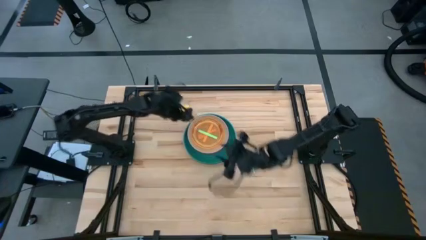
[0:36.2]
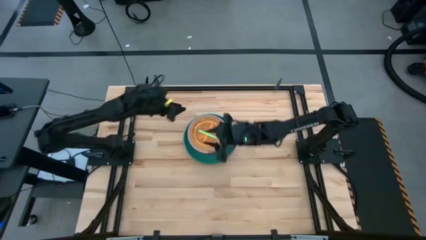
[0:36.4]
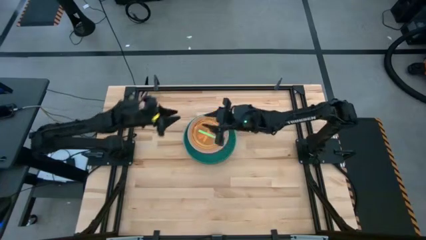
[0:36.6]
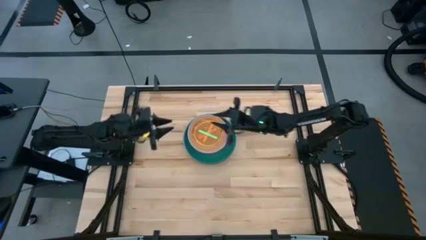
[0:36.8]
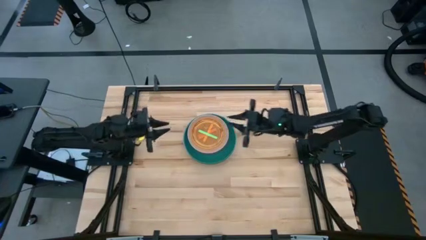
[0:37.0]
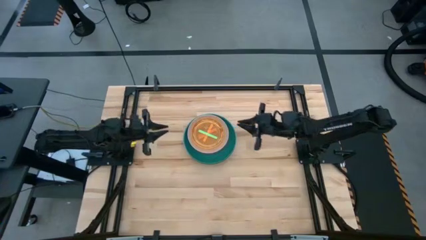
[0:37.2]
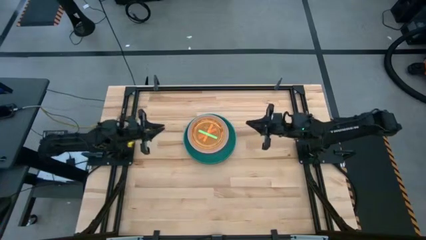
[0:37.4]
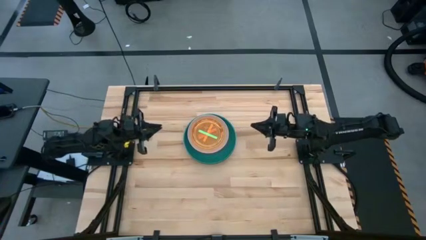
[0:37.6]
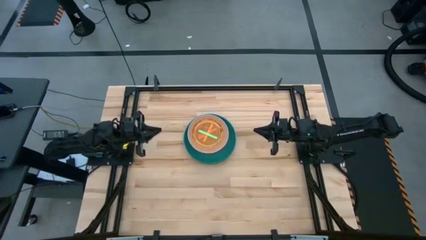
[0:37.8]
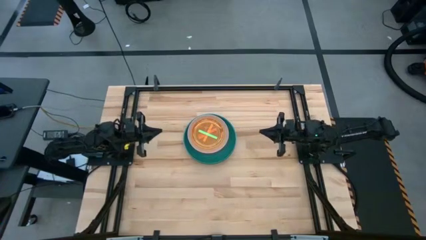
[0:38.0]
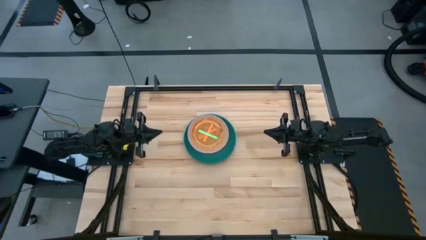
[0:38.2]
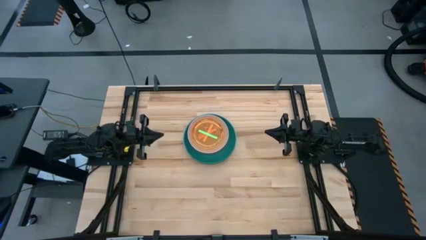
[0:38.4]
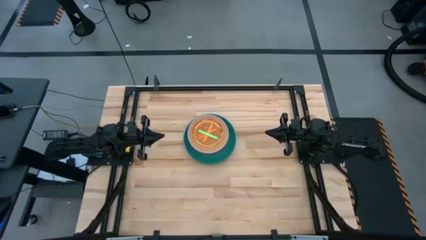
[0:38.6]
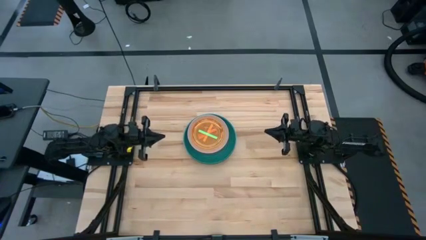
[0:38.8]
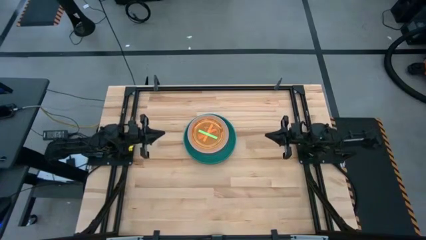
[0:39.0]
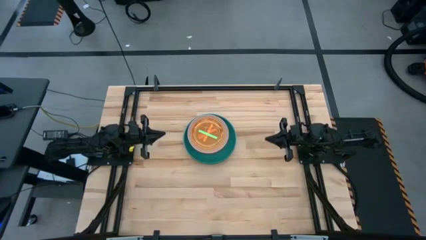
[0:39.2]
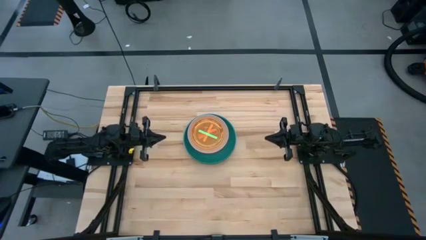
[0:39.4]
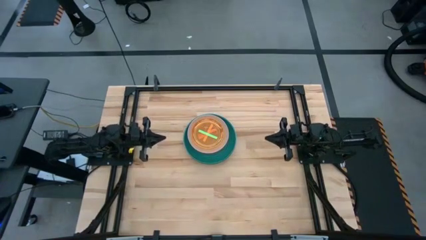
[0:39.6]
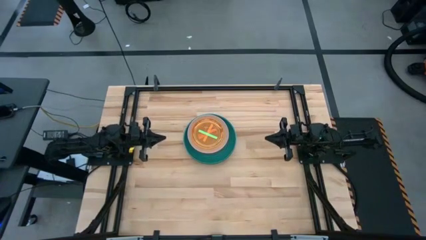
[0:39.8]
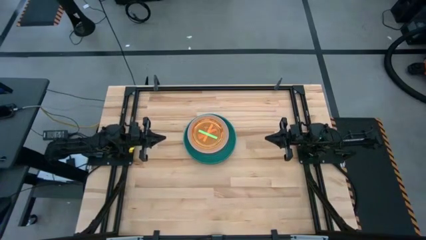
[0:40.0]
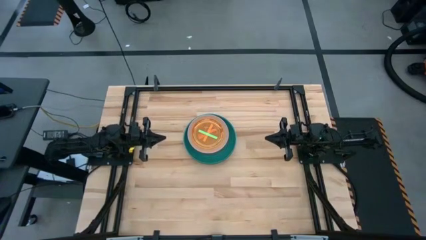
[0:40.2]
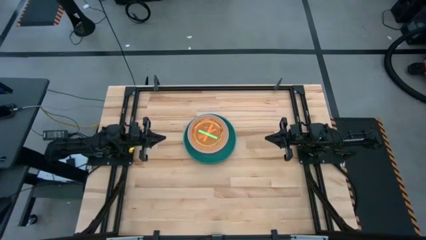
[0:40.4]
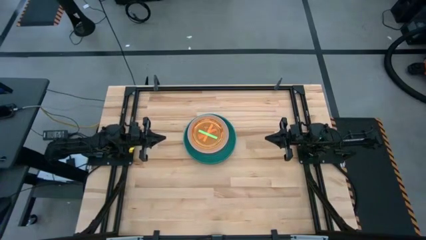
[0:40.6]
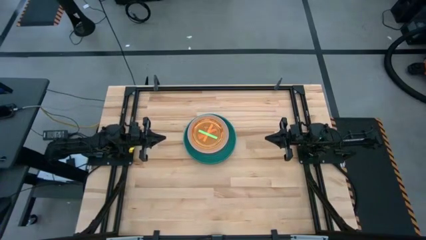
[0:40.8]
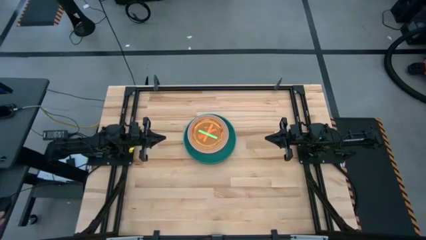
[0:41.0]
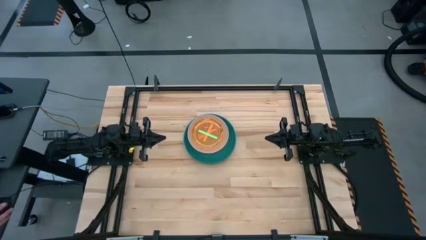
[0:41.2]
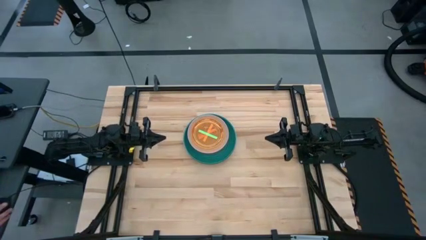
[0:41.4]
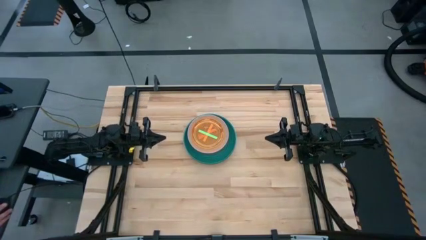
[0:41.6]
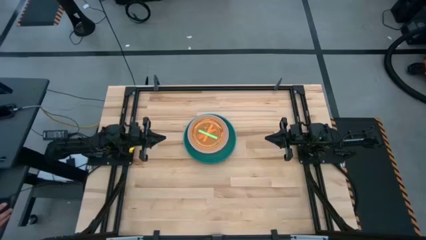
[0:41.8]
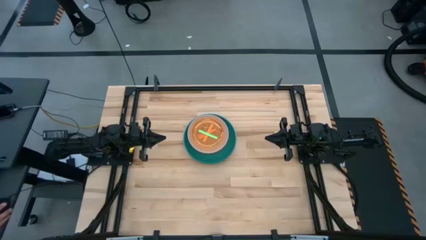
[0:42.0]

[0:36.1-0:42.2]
Task: Stack plastic plates
Return to Home Position

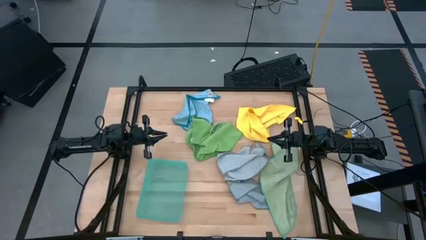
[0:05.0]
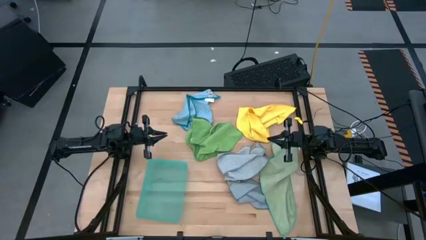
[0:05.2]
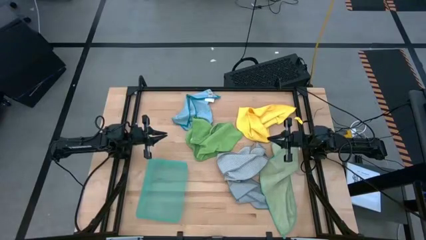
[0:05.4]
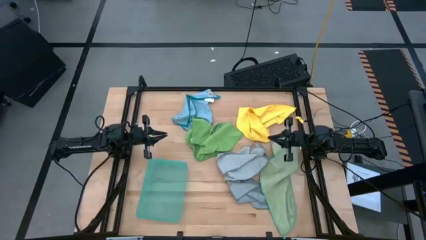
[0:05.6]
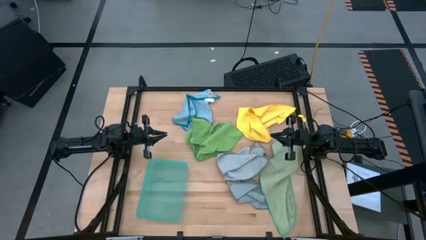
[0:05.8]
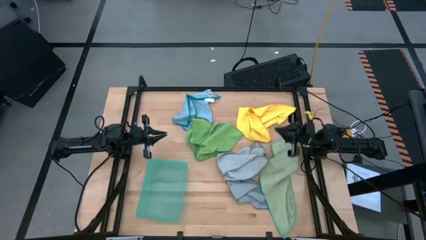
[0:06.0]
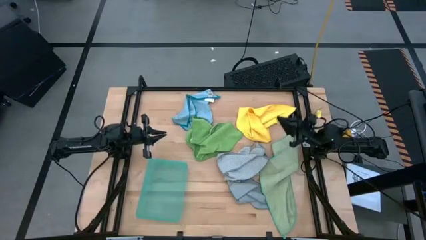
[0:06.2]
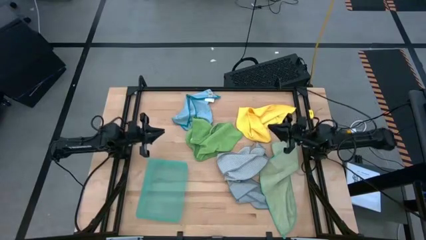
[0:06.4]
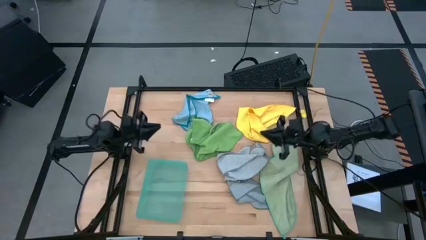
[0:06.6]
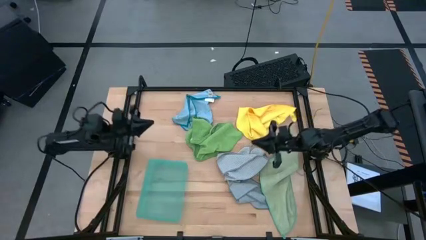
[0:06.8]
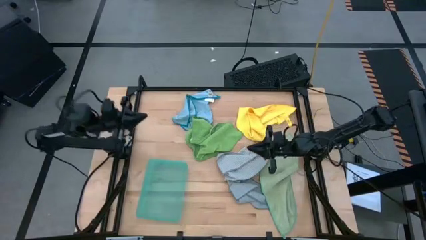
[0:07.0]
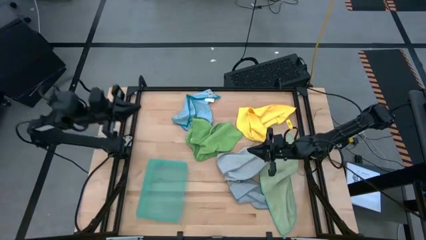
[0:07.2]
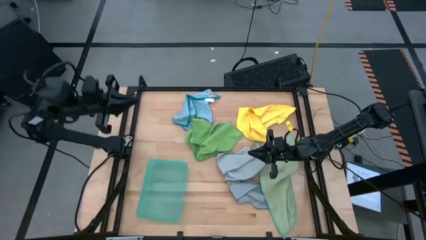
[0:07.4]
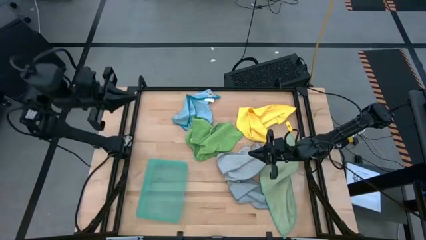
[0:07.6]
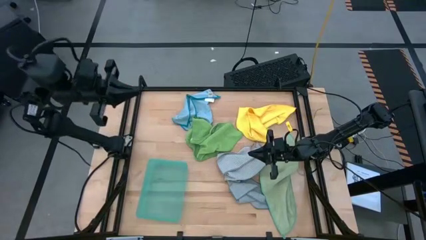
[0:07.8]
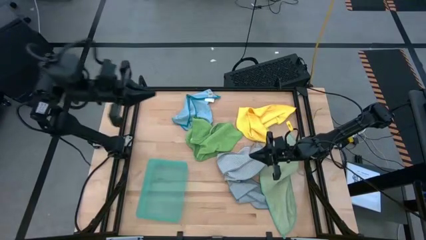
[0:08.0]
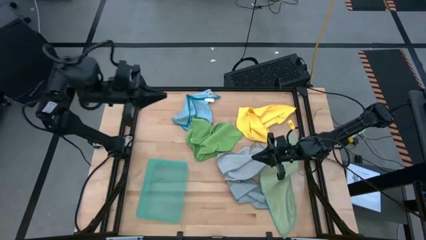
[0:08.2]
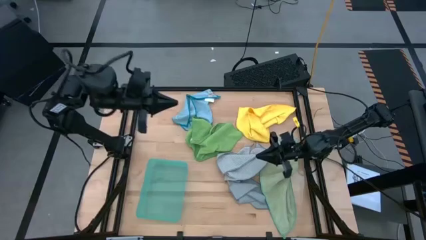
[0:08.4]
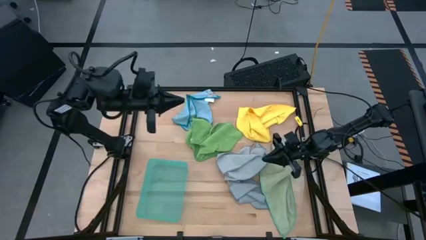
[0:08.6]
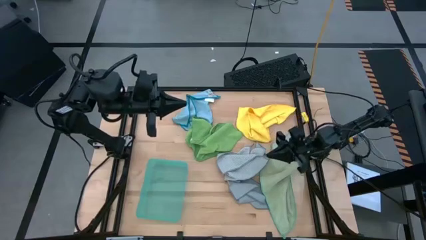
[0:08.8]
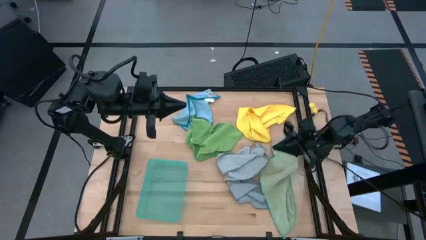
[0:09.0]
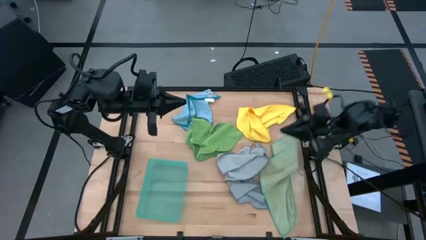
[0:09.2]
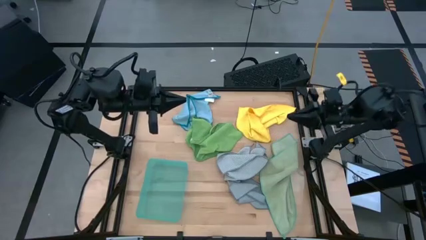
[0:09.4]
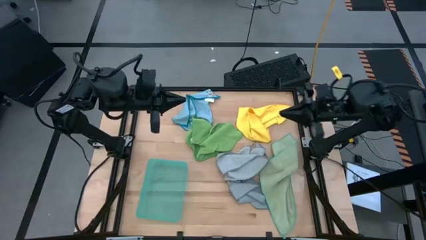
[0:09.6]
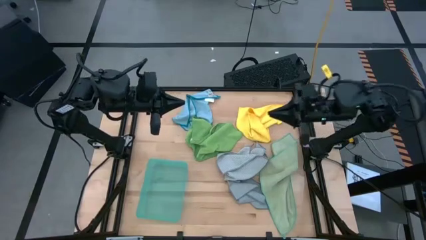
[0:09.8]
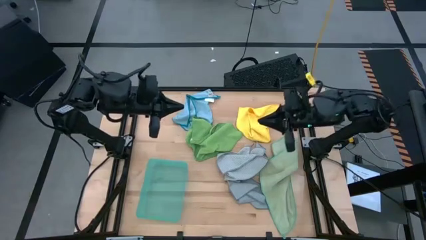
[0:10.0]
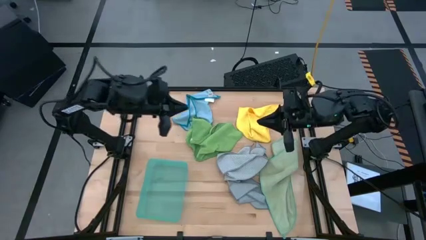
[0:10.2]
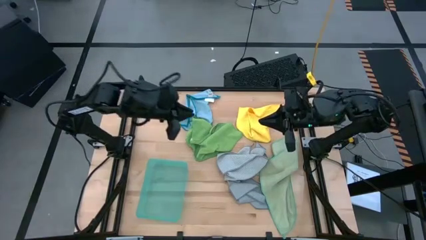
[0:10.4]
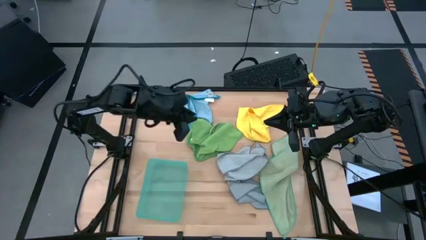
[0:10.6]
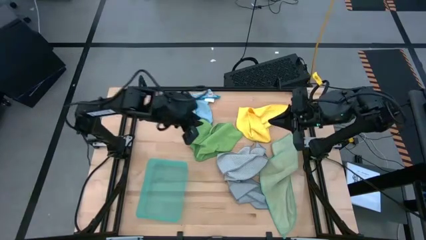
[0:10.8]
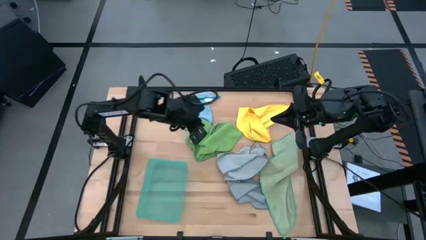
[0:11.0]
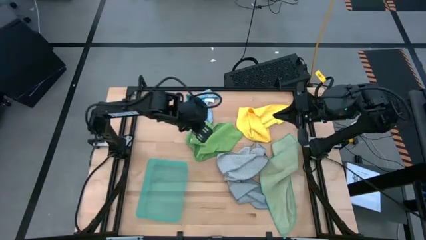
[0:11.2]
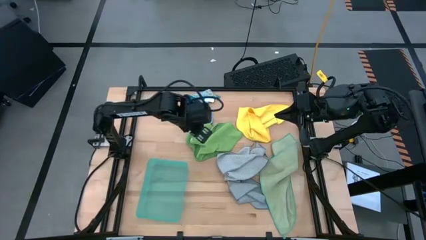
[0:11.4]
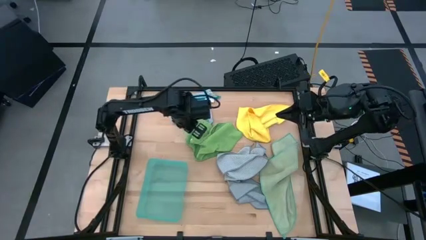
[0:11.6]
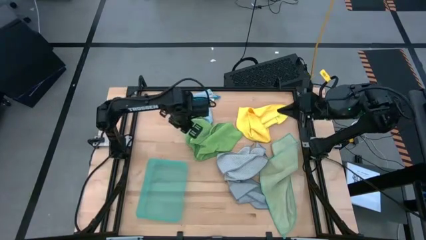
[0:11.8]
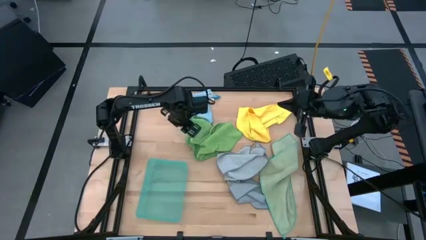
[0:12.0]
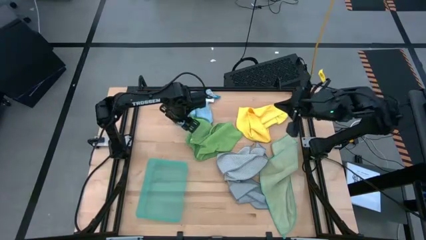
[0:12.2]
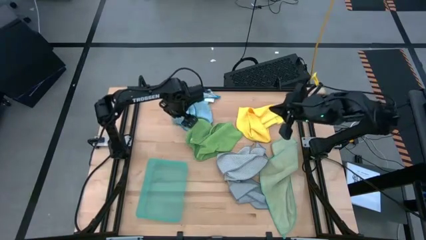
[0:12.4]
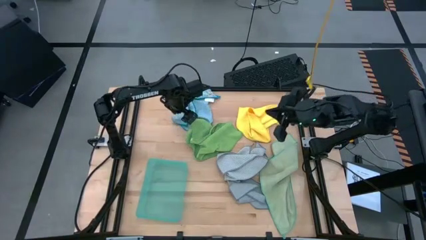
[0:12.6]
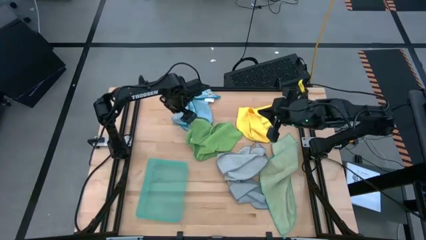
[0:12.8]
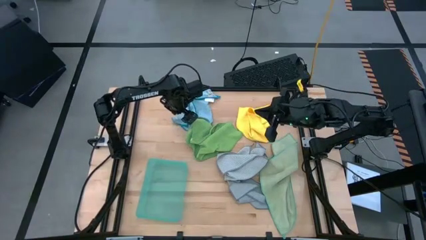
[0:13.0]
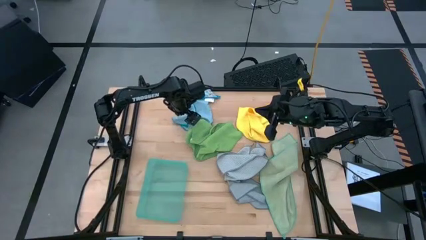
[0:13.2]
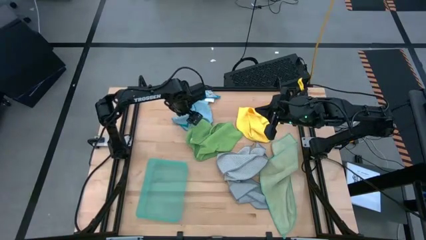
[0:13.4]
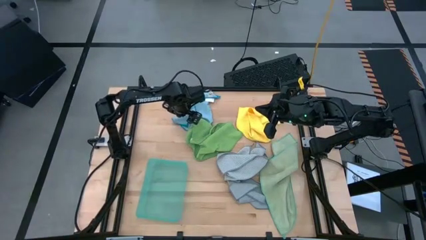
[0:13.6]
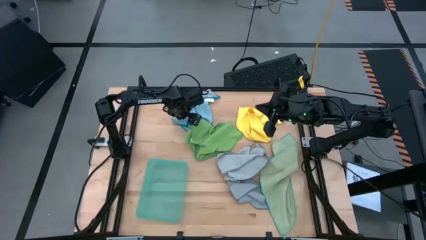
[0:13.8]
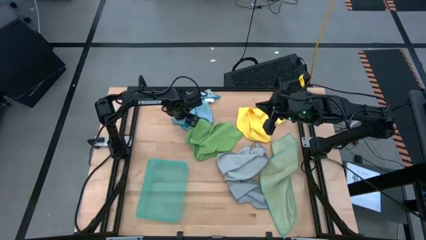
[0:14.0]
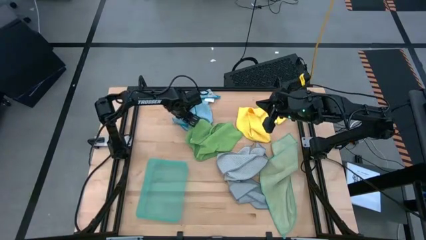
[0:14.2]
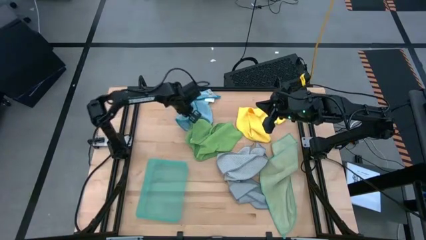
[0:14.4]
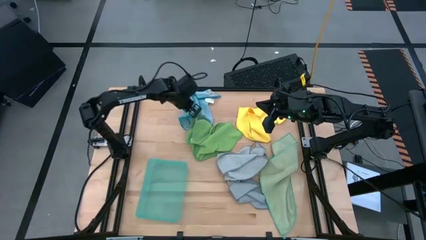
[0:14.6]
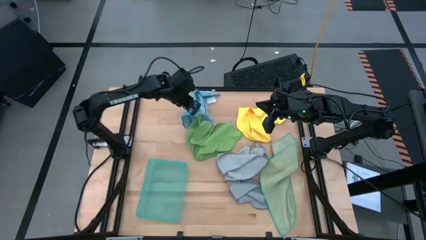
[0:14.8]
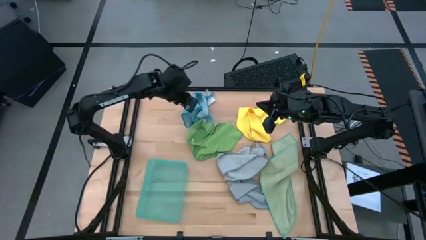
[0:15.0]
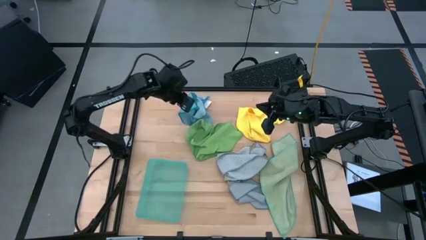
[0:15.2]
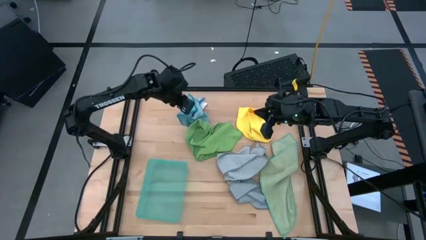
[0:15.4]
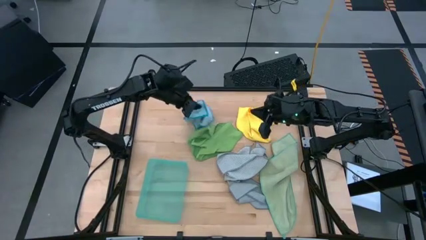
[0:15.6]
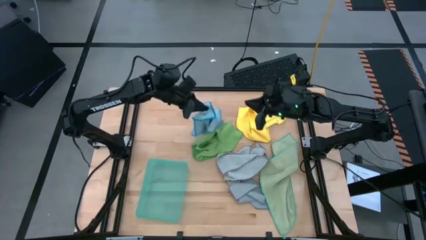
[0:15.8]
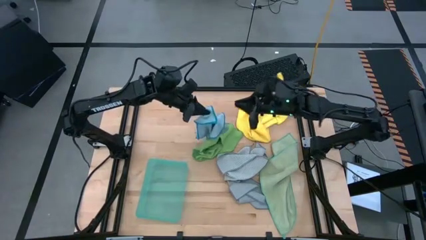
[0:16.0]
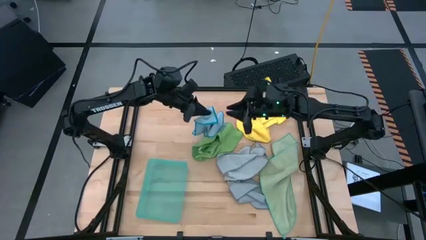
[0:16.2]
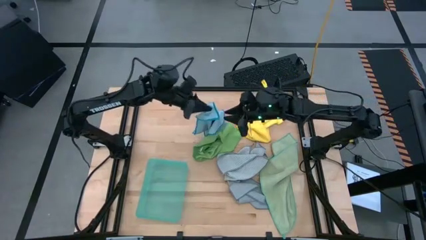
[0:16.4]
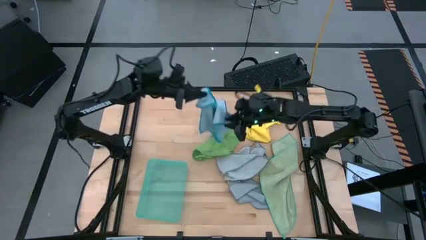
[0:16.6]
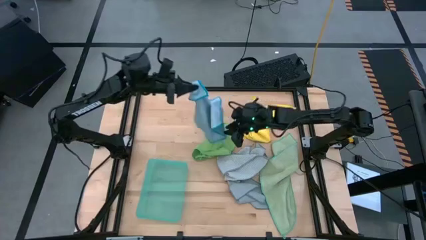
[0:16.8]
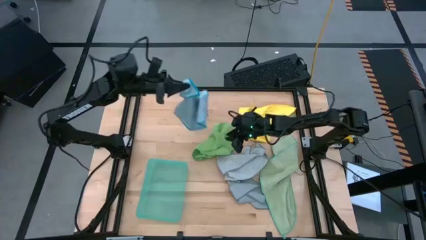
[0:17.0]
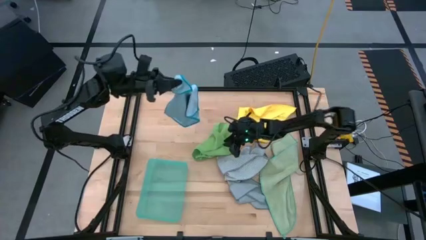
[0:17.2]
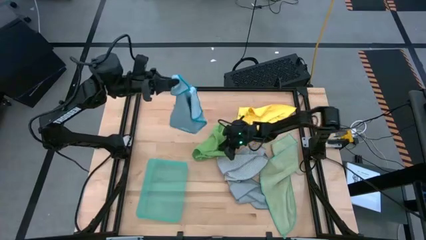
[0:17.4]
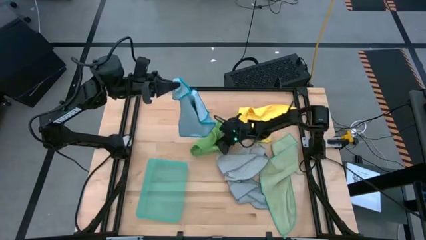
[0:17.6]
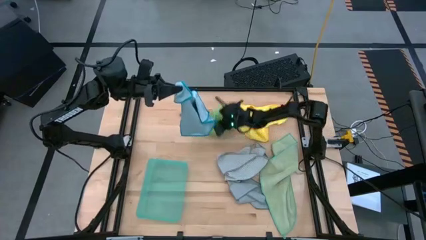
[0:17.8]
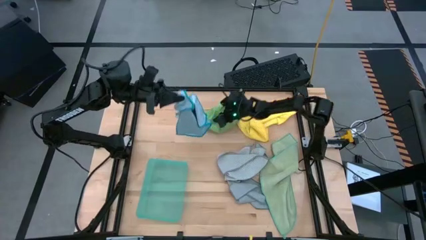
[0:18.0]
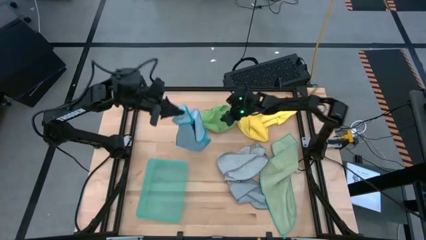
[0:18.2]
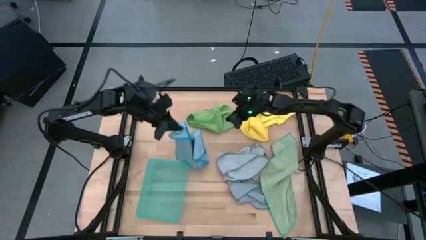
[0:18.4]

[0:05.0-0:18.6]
Task: Fold microfiber towels
Fold the blue microfiber cloth
